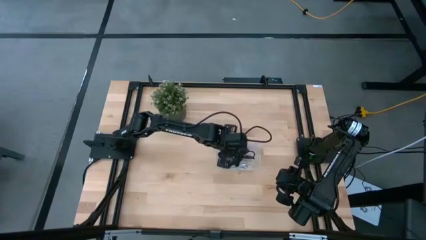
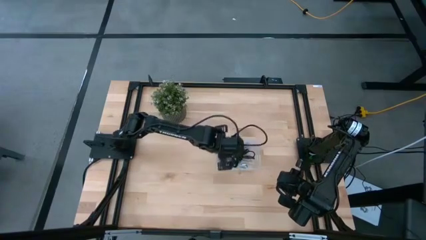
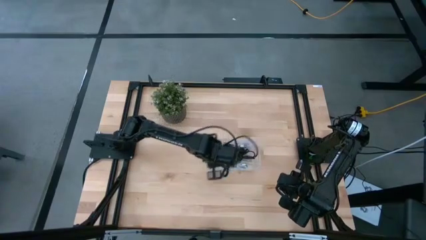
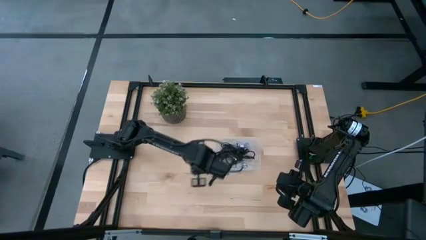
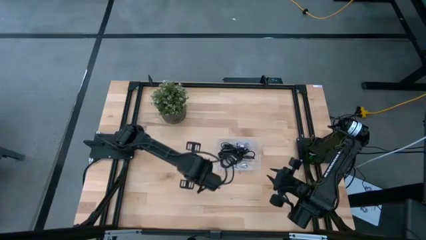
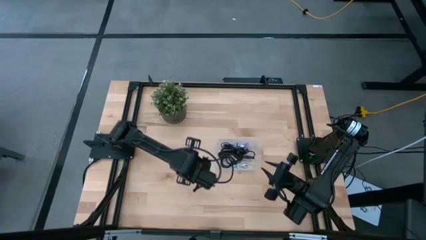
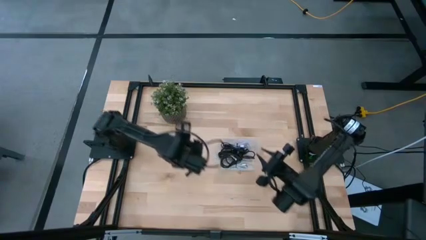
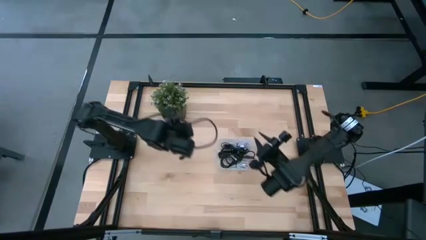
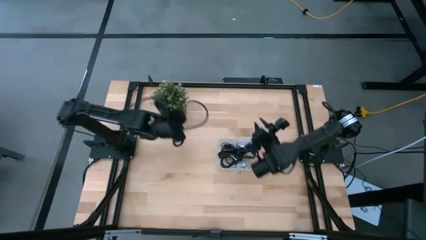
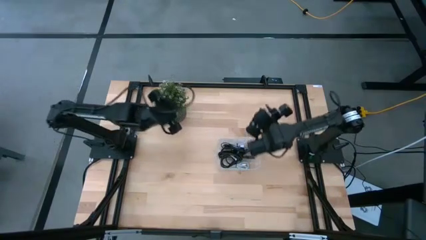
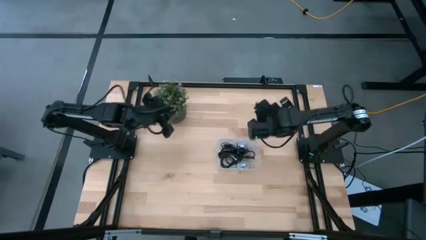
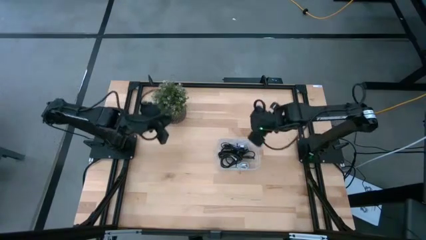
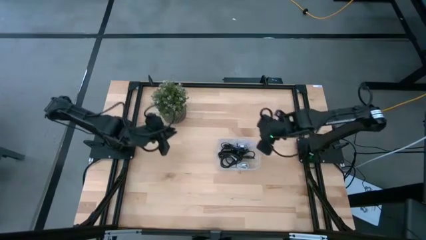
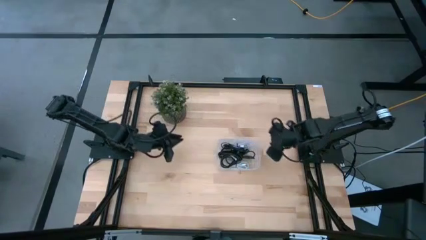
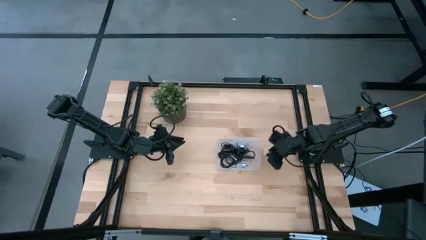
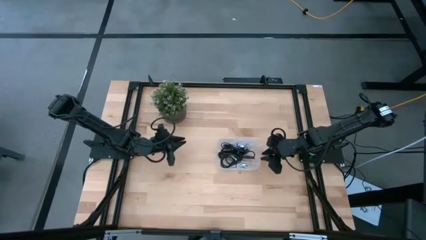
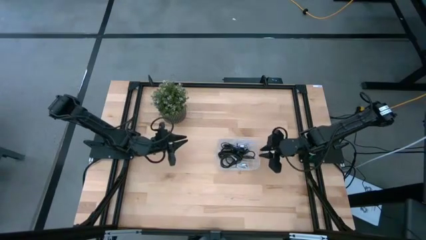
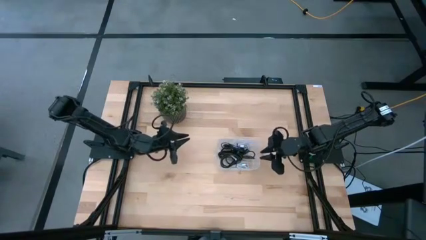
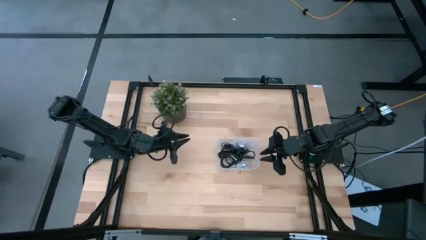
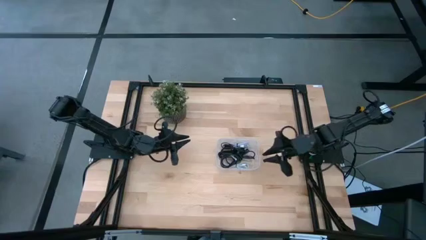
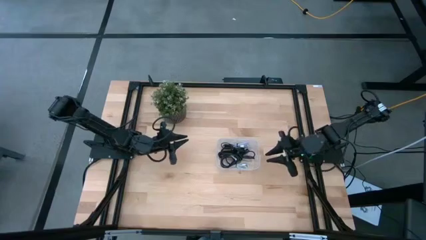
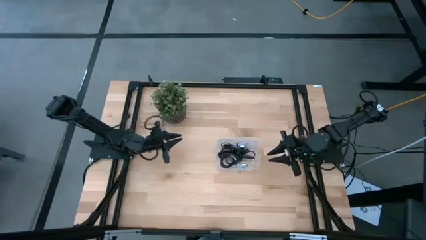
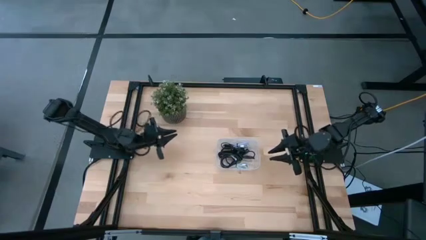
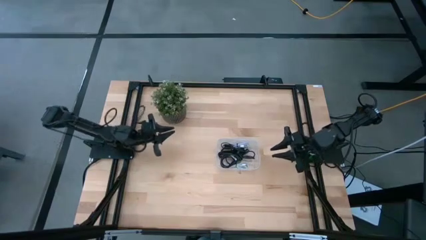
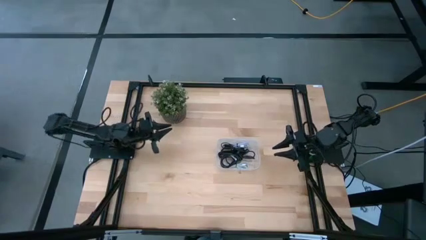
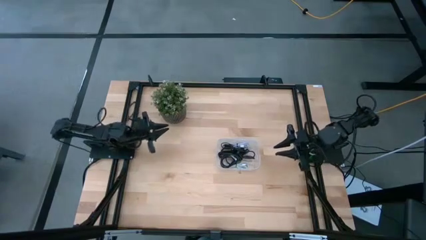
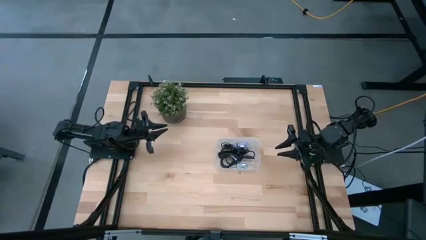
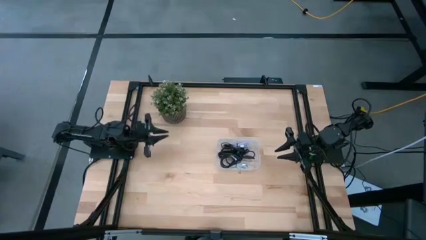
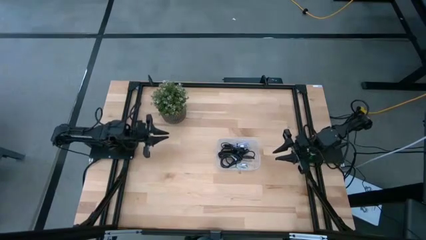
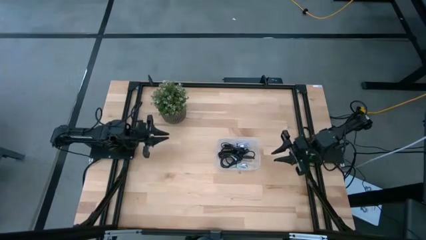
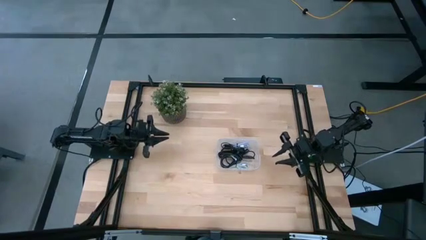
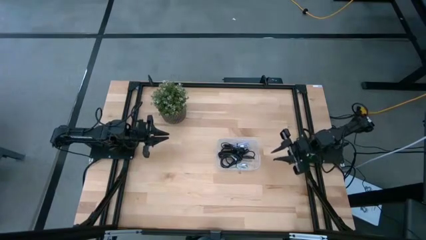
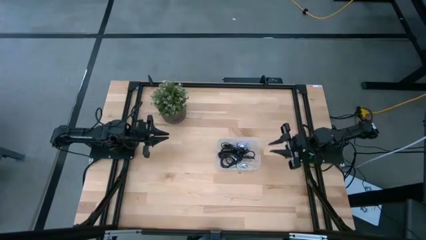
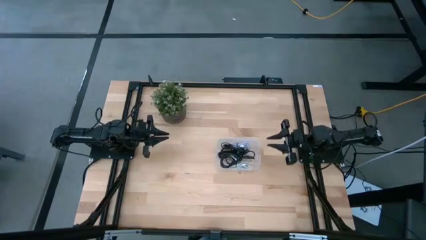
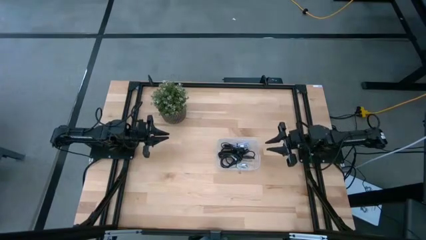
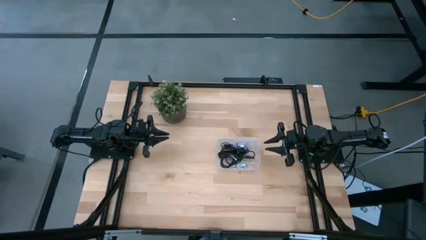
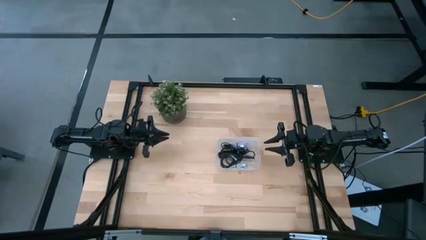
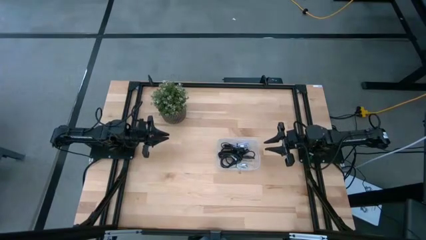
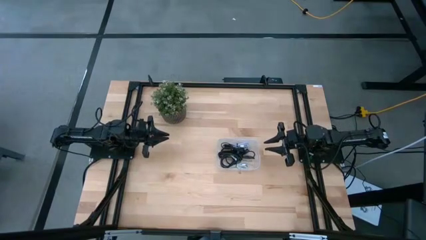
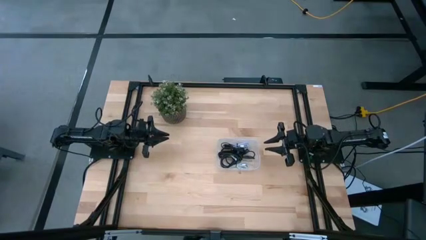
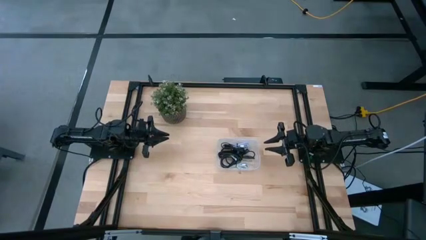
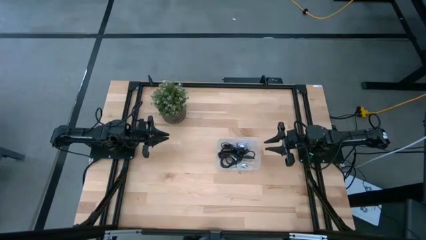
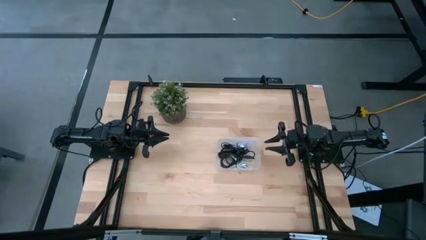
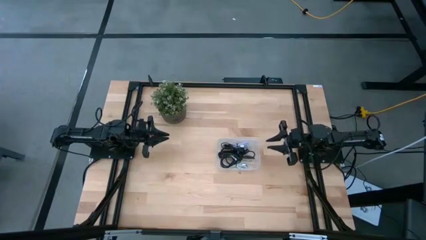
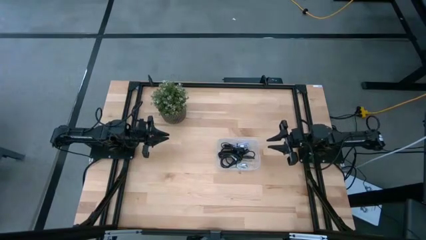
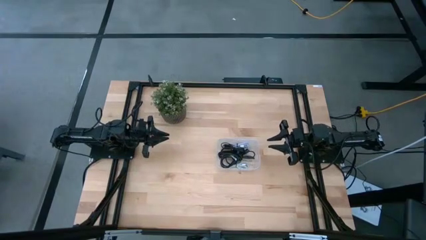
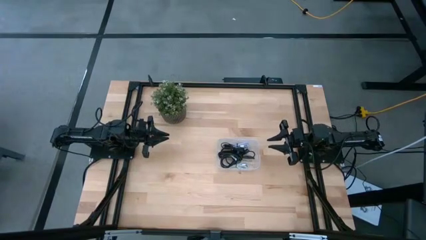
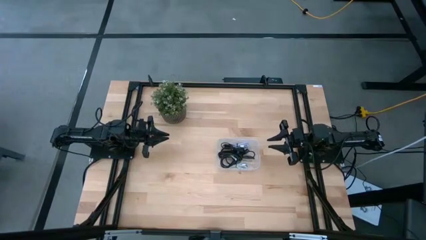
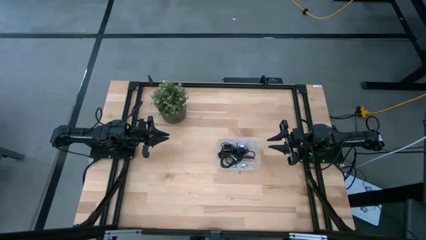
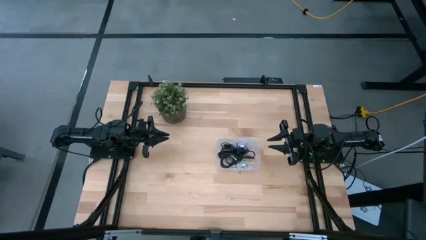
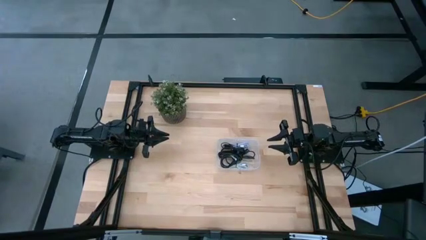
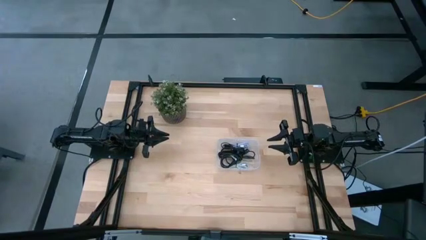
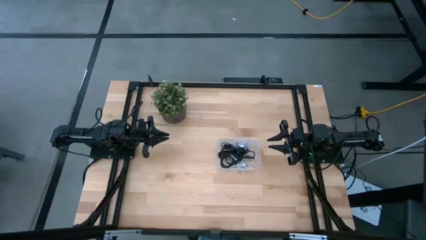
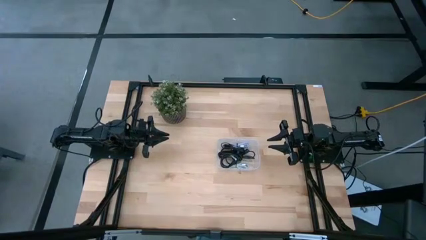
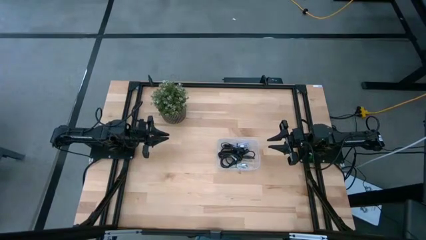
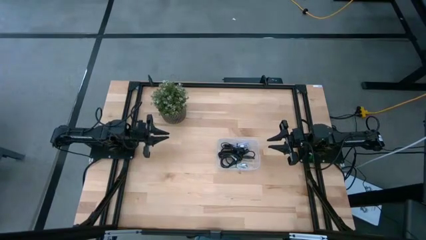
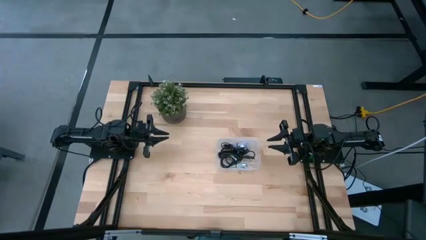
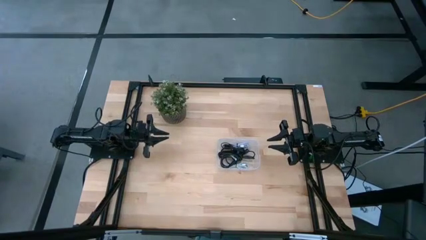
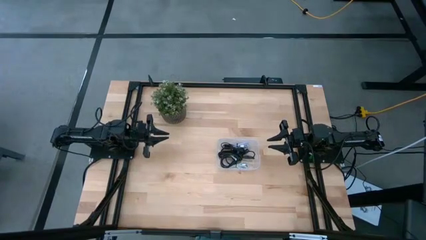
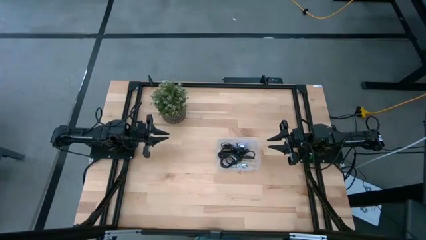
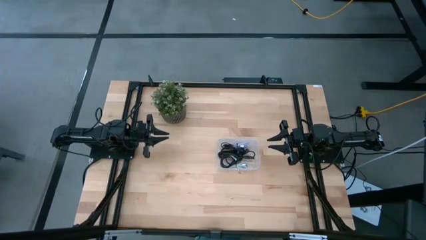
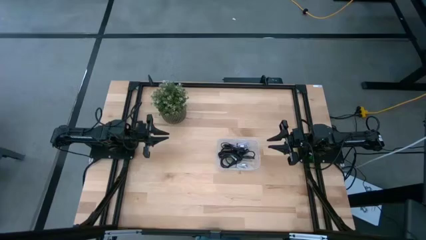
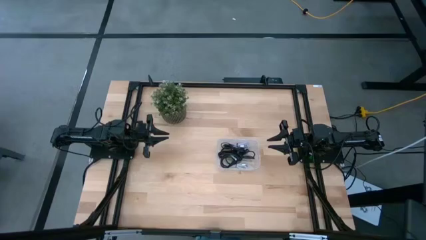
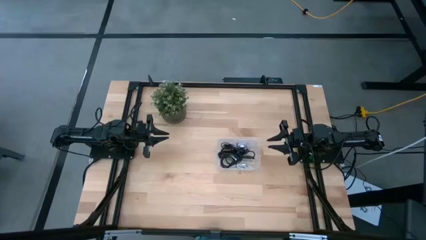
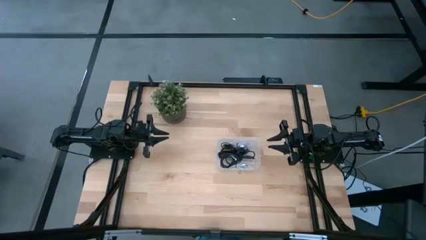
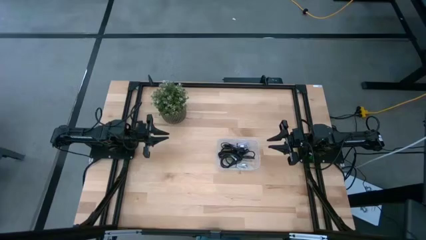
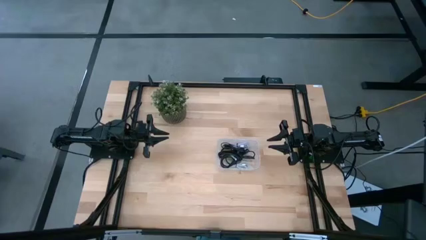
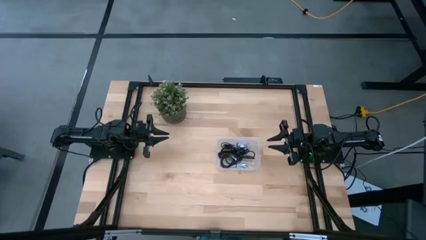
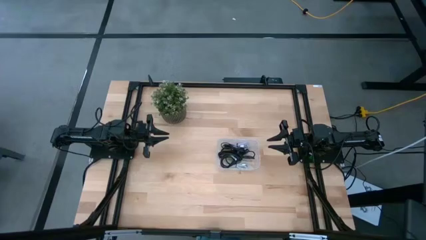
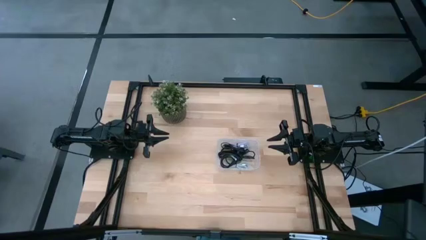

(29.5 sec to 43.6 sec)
Task: Pick and place USB-C Cables
Return to Home Position
